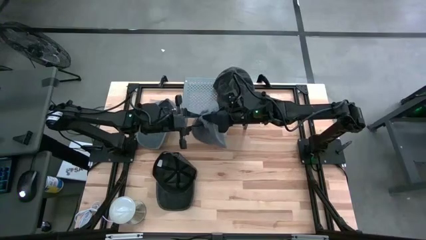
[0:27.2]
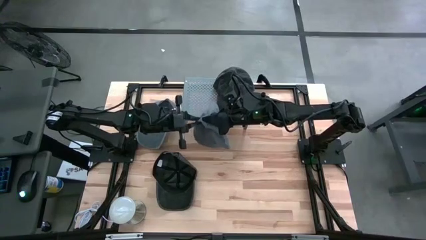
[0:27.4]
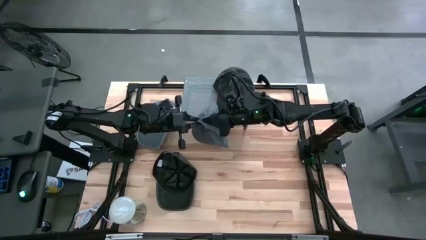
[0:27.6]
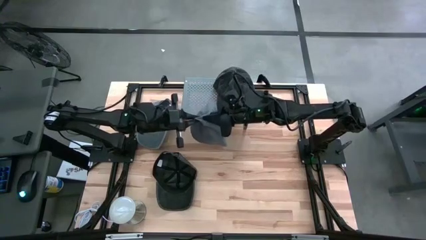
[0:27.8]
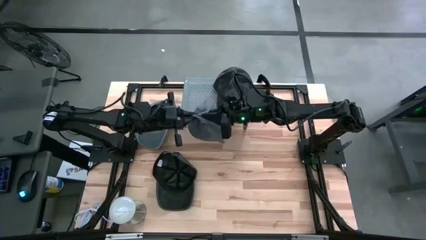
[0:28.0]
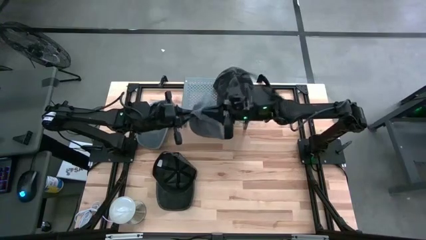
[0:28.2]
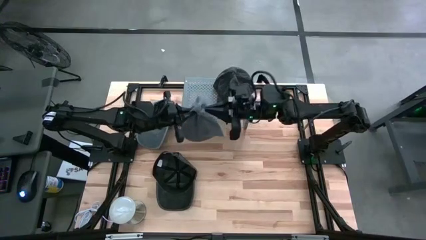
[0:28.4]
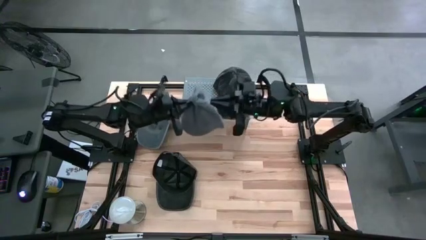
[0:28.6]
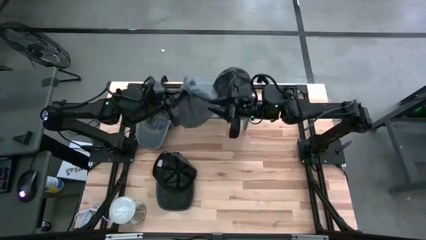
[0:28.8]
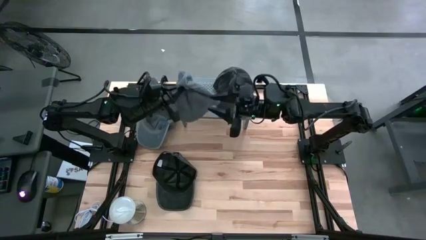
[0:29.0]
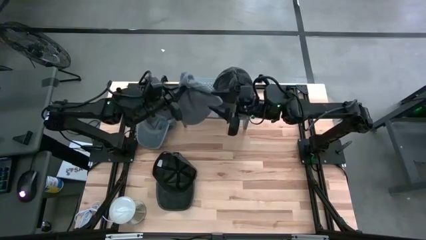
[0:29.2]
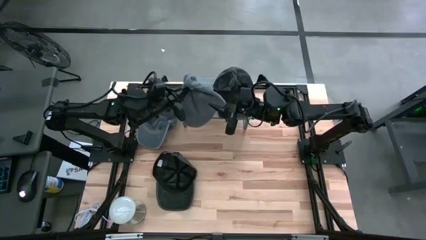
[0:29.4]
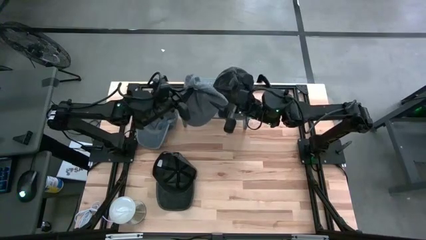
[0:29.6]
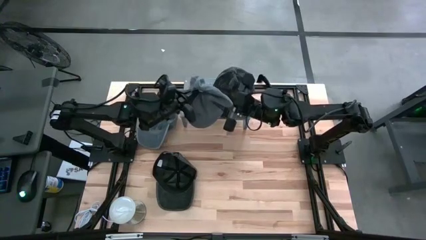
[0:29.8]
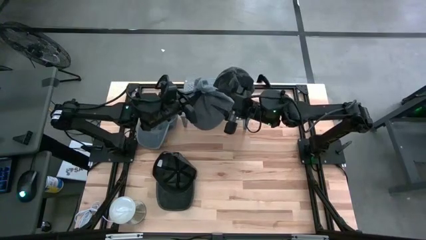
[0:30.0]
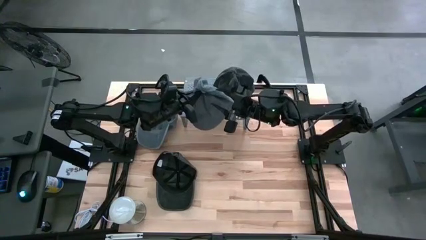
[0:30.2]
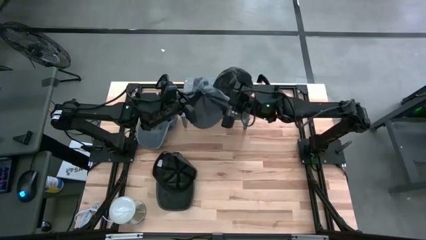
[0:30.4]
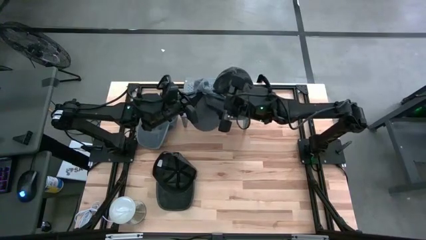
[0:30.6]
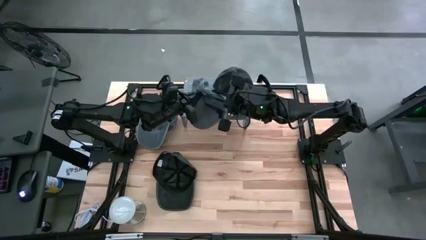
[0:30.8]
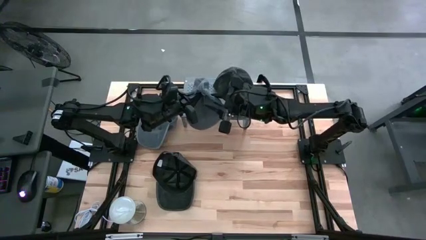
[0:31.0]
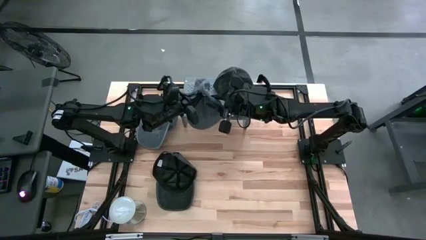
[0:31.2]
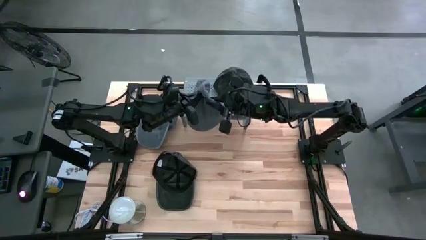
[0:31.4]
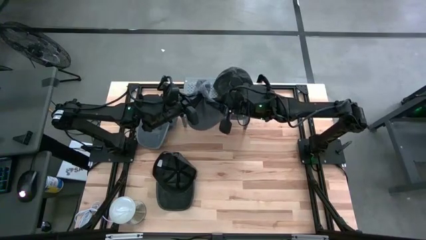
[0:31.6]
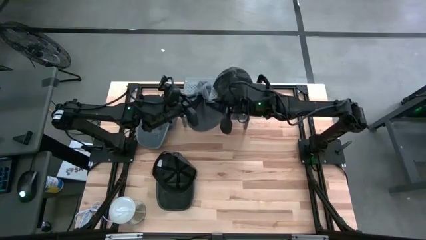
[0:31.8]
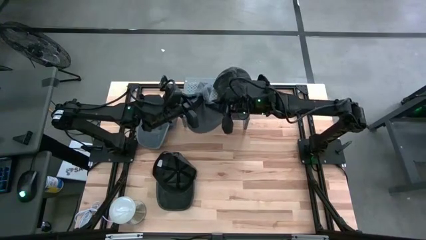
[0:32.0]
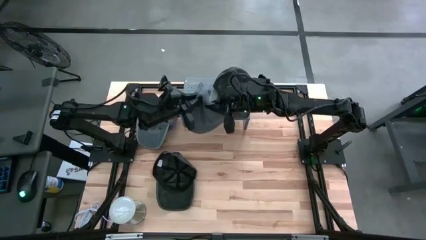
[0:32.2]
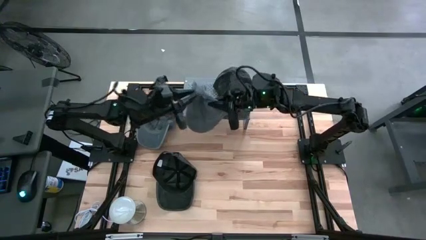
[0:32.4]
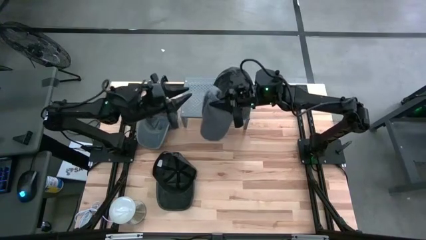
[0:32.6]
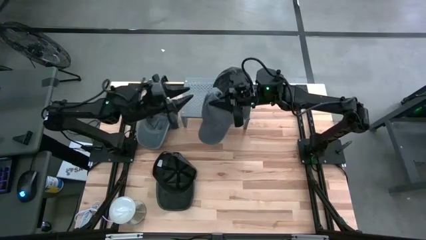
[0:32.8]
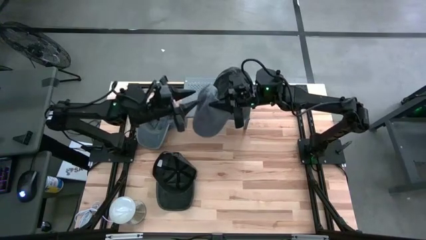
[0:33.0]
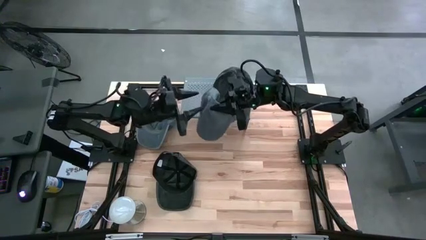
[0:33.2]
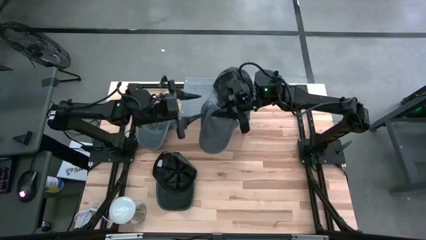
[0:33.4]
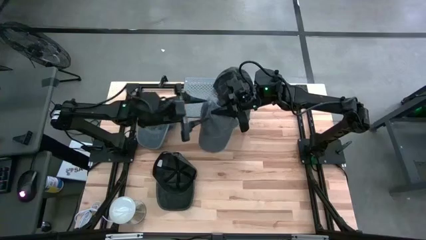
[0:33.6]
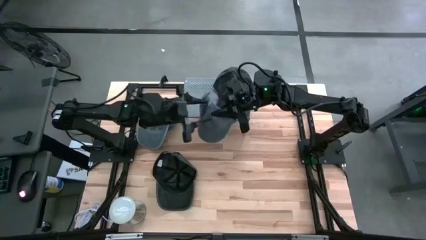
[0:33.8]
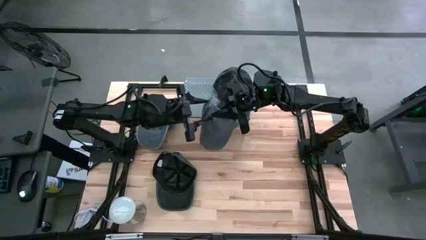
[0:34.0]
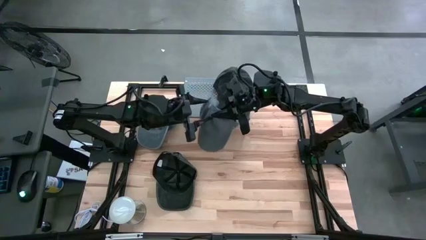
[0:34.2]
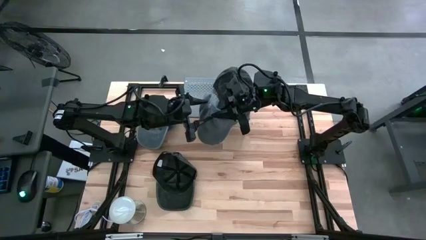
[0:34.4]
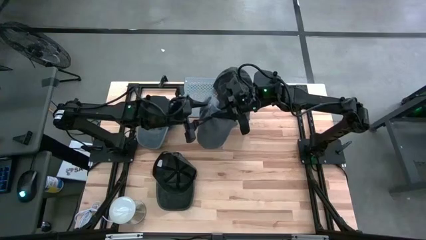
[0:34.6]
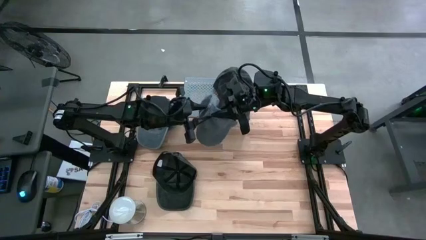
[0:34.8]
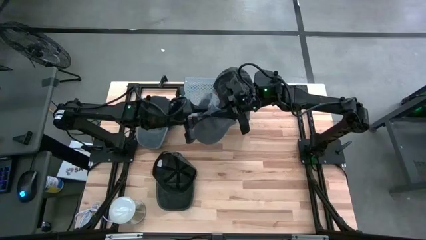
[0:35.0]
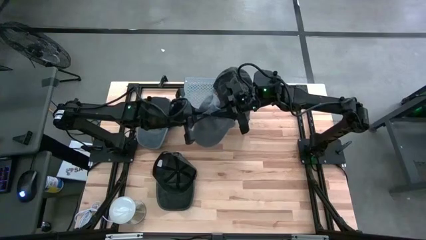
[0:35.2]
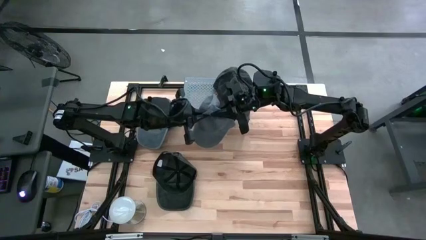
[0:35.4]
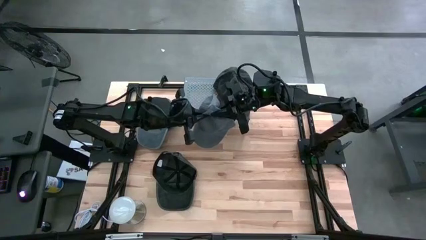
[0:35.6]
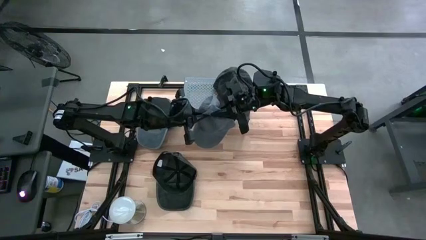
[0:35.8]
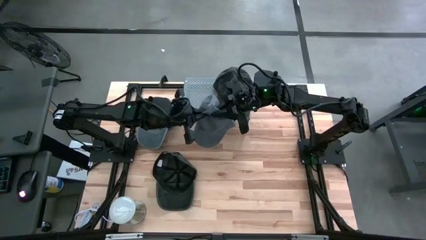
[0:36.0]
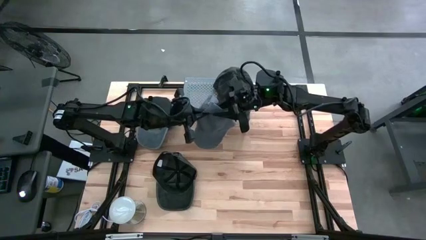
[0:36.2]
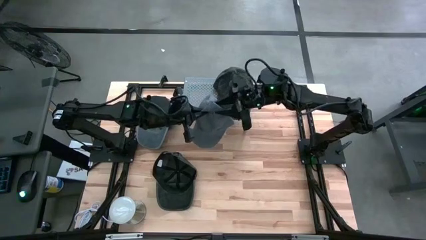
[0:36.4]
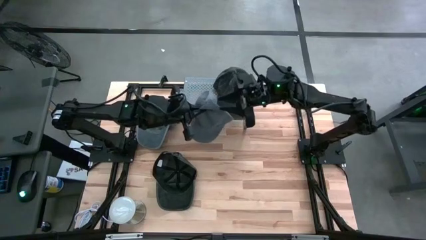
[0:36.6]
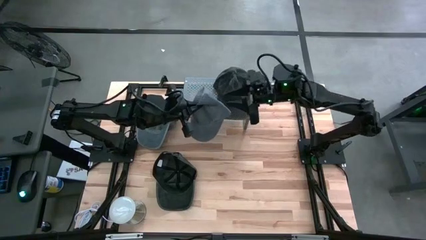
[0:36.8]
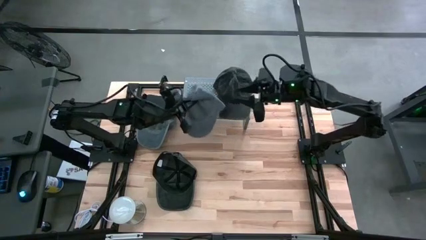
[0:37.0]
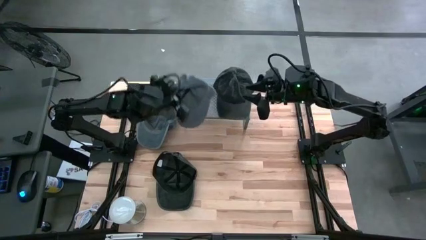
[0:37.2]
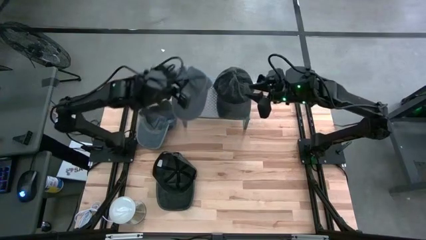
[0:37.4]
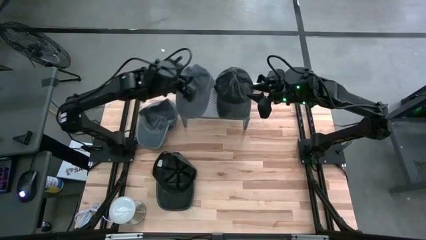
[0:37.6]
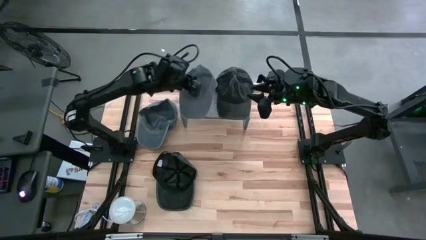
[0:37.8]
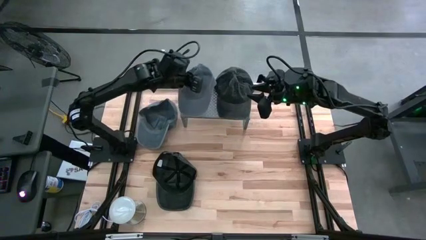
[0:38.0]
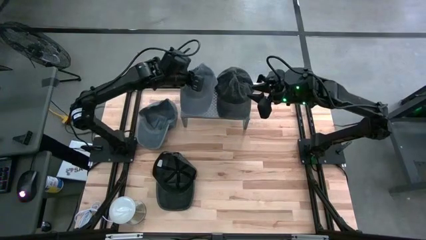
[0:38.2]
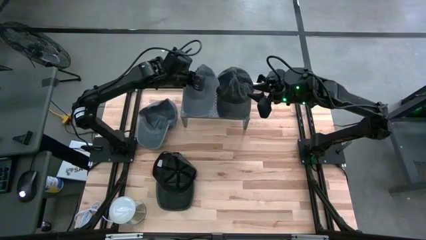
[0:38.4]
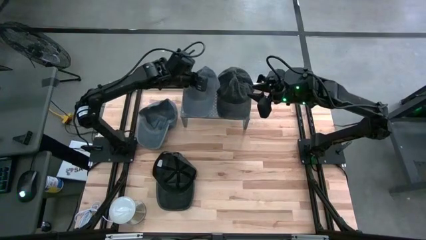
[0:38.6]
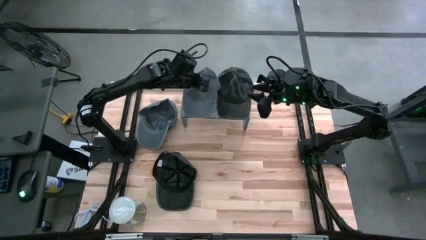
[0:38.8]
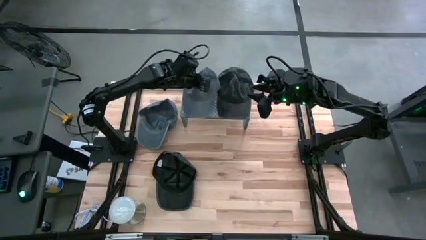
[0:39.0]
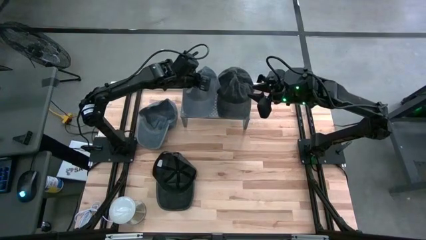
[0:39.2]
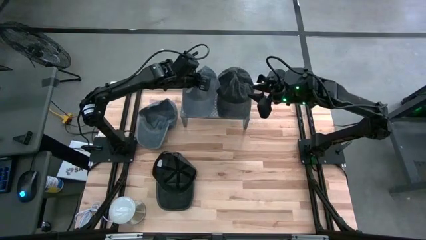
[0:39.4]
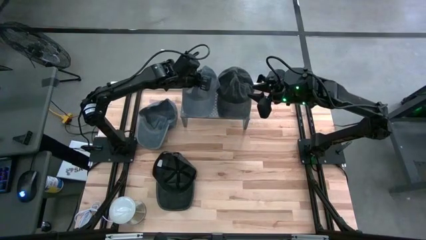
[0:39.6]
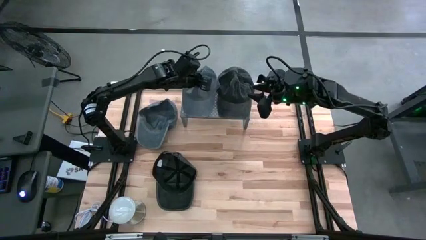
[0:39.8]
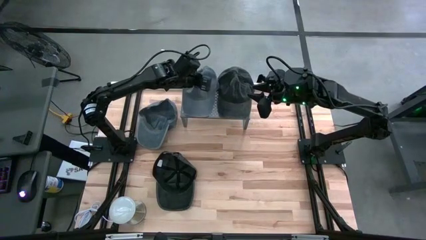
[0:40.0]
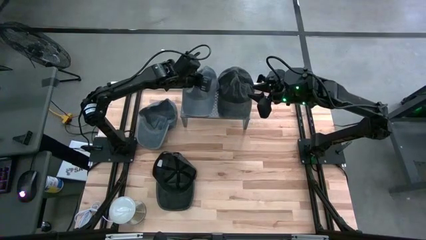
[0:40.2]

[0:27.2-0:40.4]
Task: Pick & Place hat
Put the right gray cap on the shelf

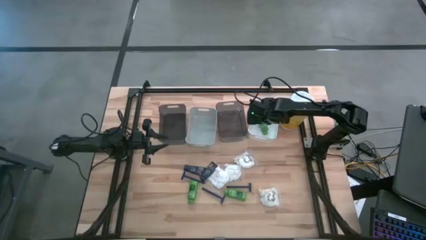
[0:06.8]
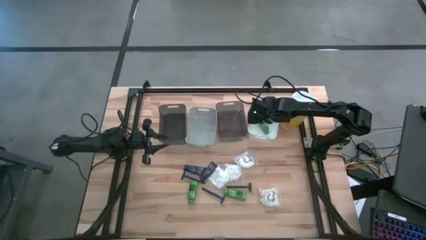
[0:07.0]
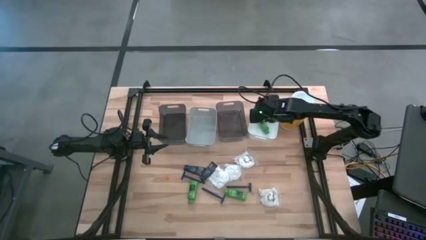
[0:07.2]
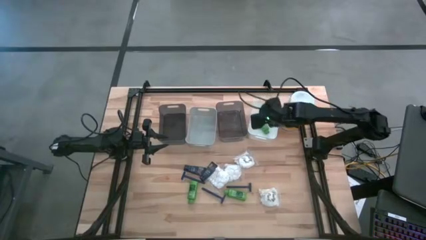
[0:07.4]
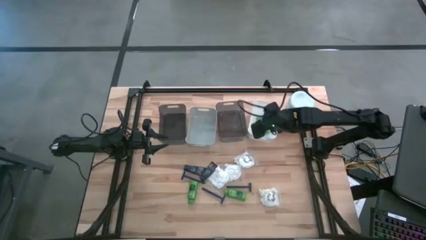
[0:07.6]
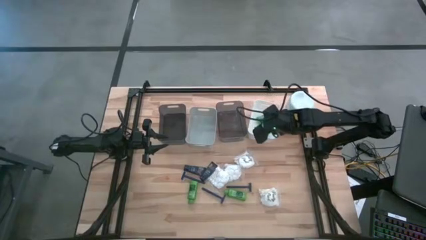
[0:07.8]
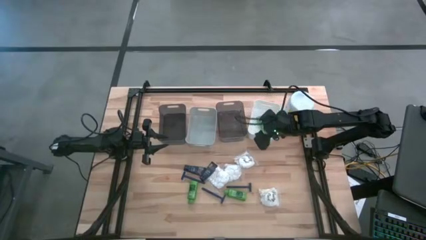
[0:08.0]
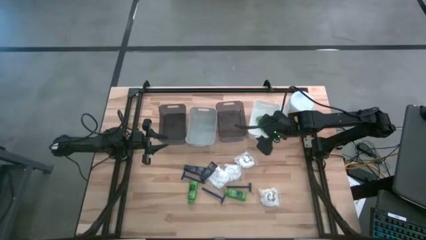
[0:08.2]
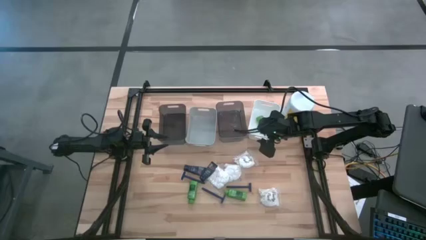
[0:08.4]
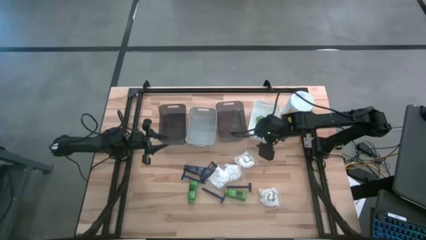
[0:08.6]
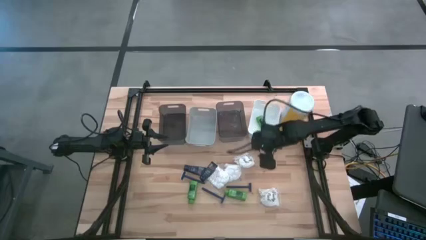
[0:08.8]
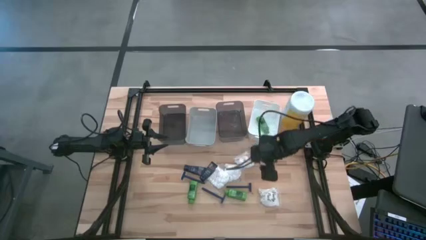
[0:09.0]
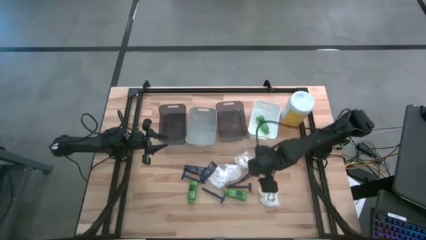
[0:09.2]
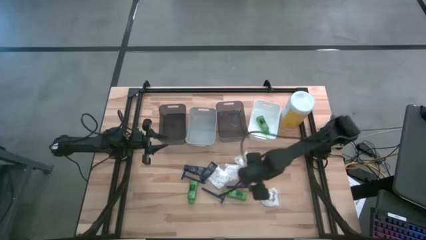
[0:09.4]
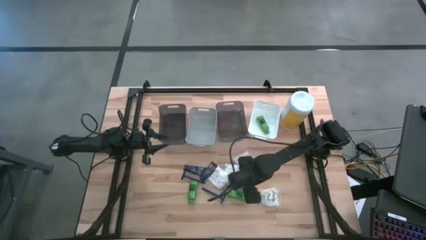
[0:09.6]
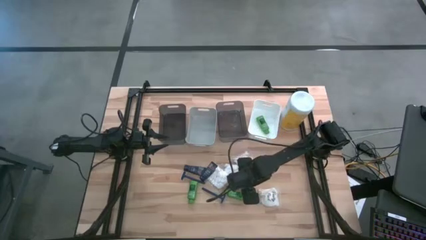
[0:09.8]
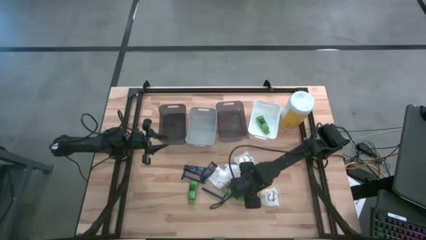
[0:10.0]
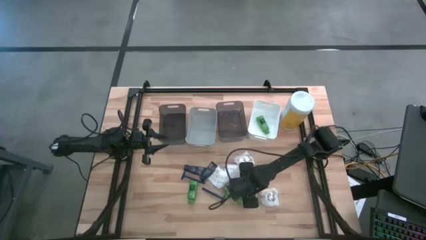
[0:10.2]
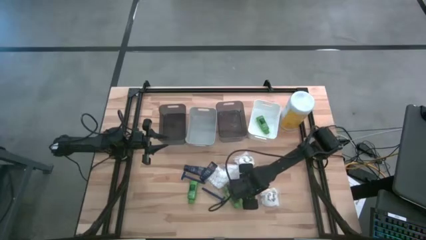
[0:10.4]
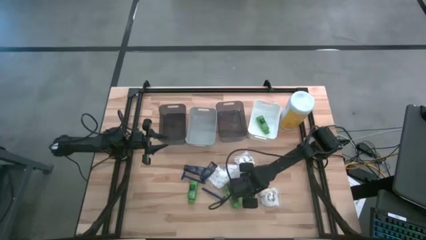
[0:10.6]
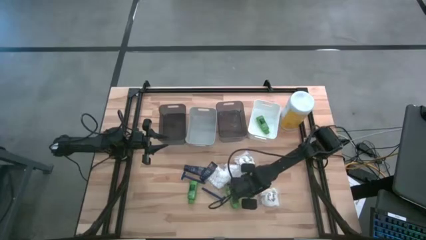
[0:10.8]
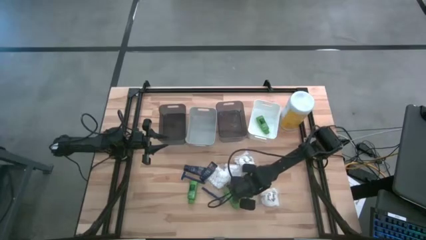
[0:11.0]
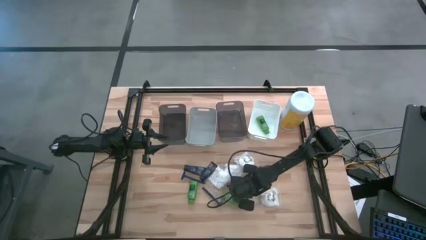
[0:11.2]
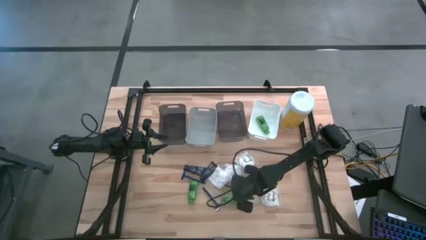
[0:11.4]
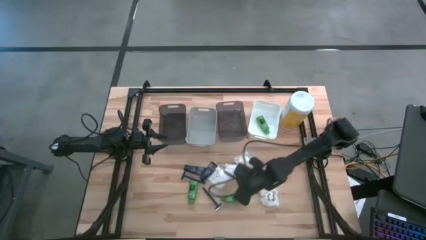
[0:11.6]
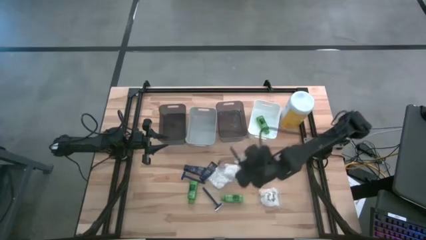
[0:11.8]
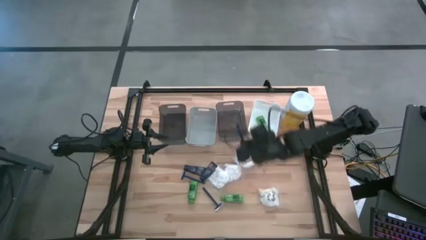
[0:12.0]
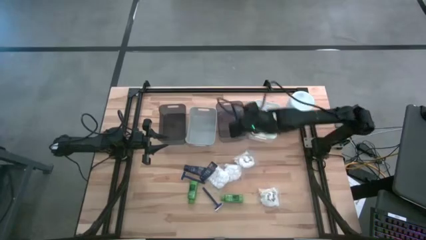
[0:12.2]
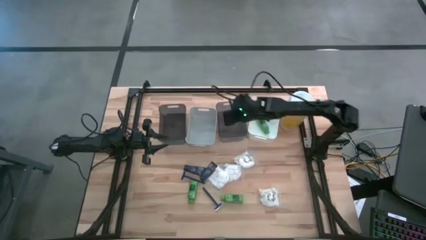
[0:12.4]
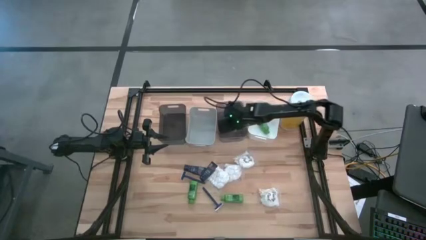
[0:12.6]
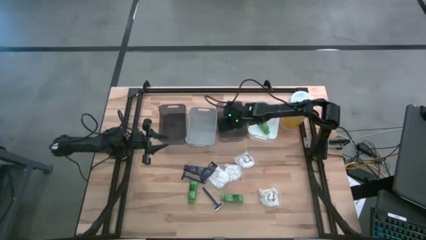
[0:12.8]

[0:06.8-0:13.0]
Task: Pick & Place Travel size toiletries
Put the blue razor into the right black bin
